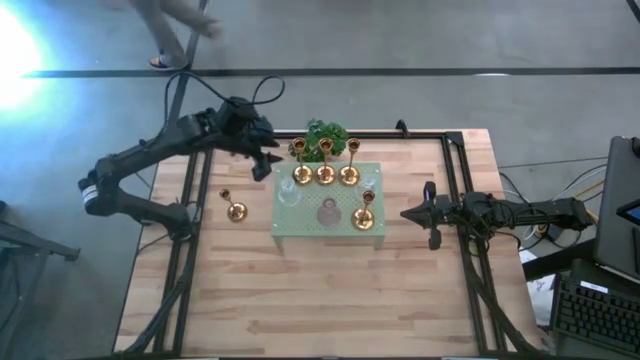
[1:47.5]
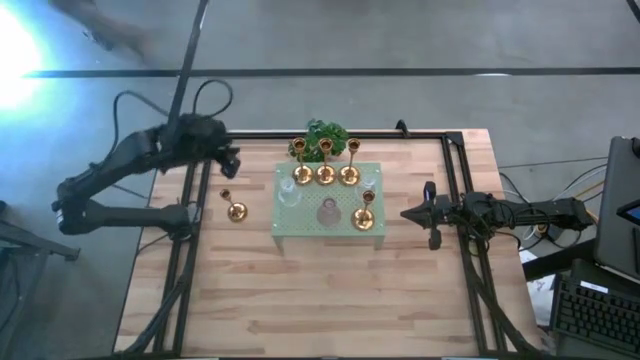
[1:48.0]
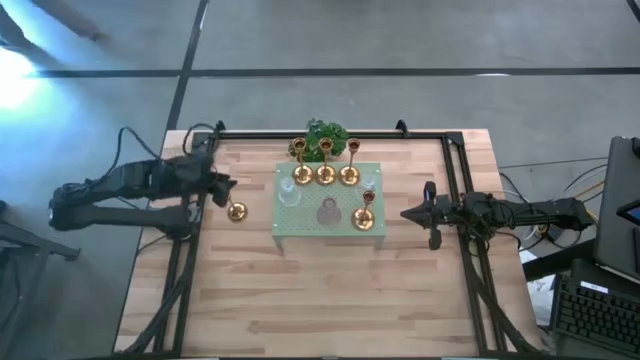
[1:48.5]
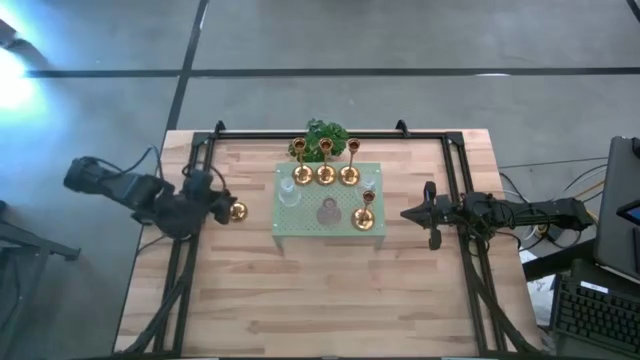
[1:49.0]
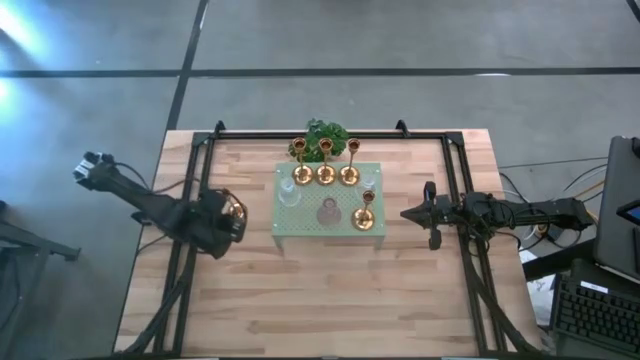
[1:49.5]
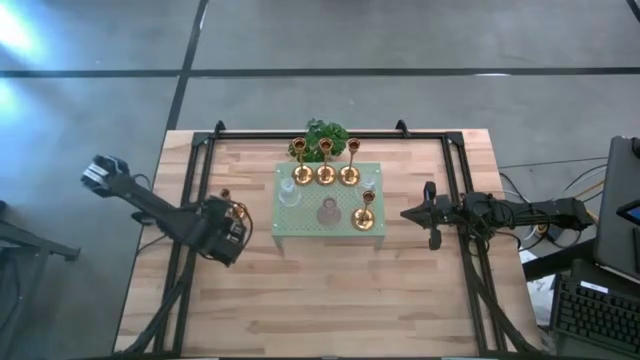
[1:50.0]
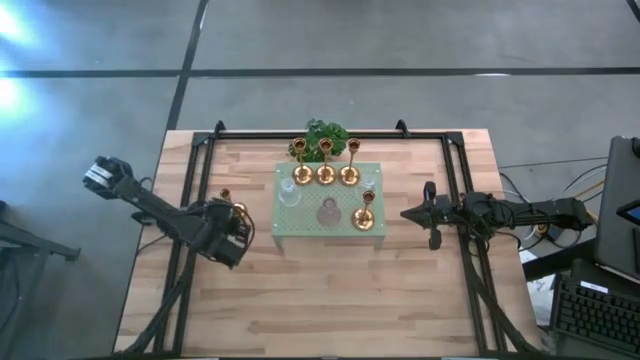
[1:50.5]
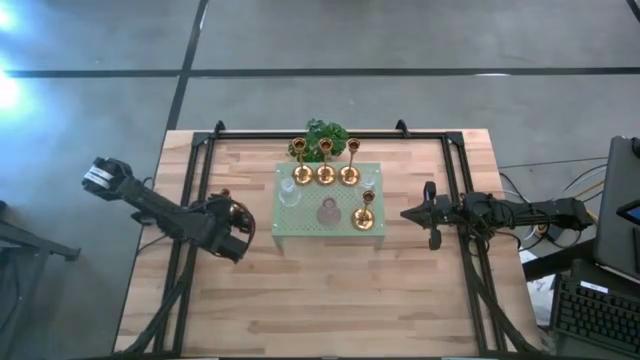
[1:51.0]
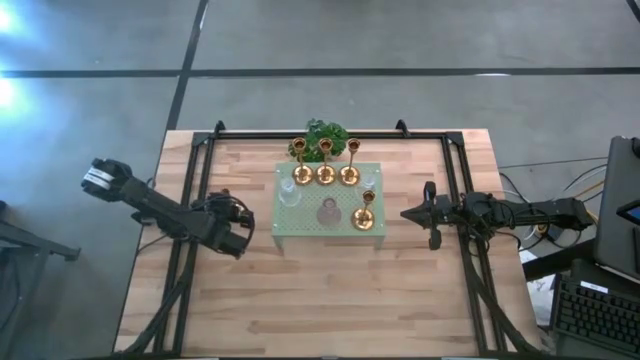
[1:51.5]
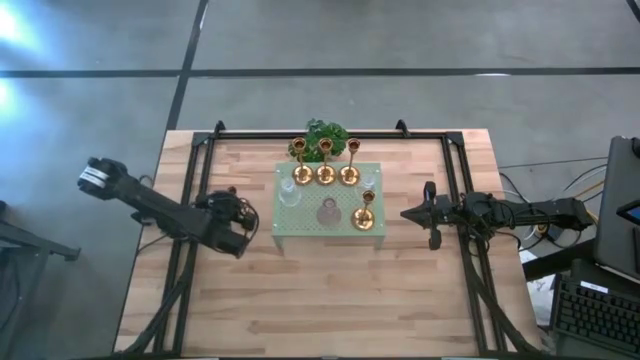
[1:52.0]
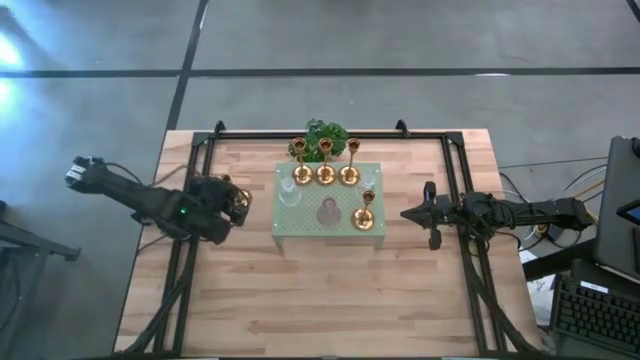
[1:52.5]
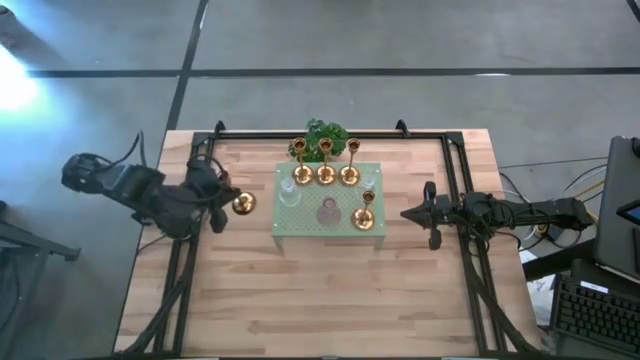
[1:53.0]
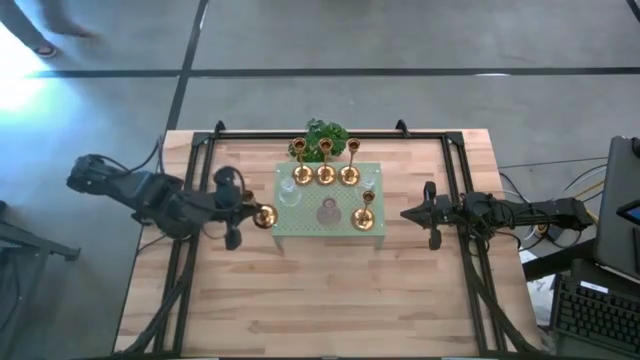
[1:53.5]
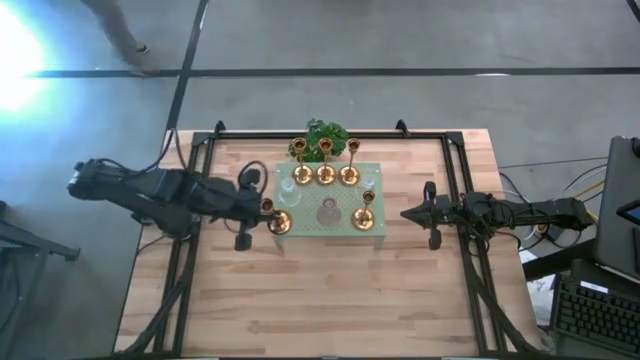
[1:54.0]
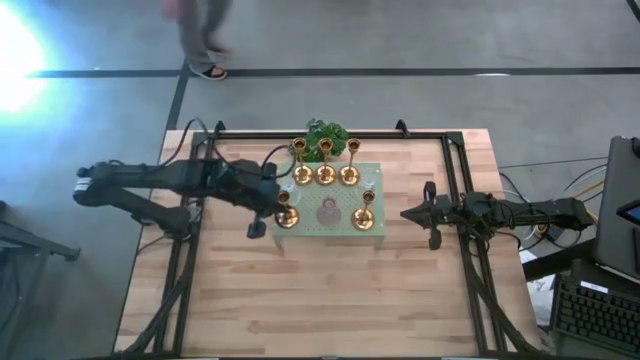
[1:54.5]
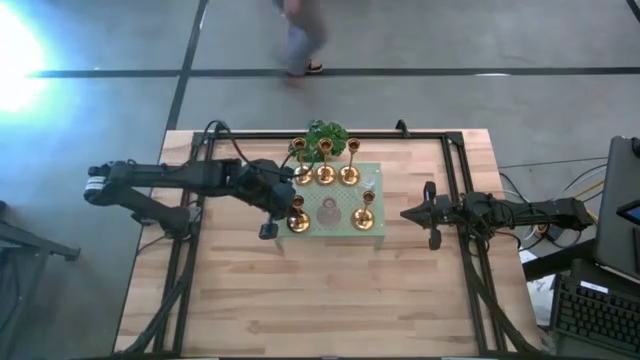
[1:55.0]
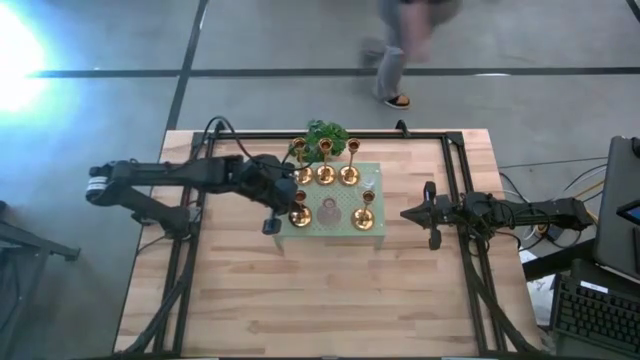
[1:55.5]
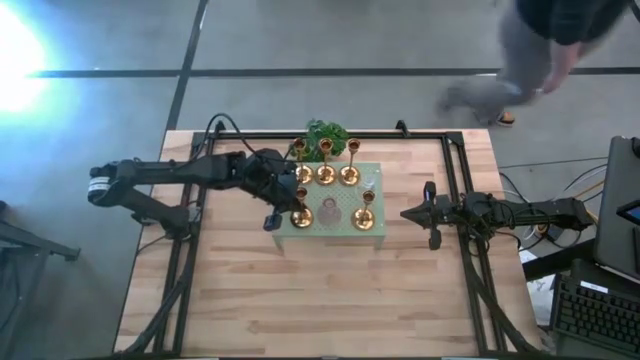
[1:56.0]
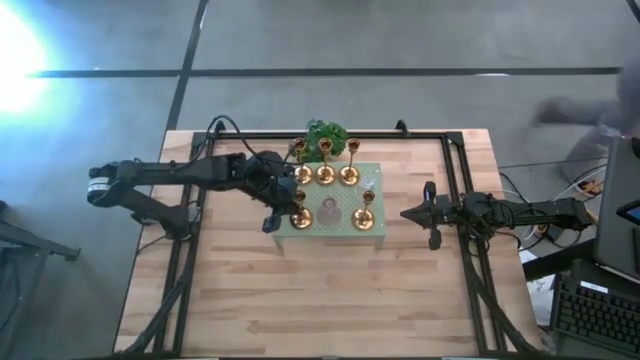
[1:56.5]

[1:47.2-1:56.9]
Task: Pick & Place candle stick holders
Put the gold candle holder on the shelf

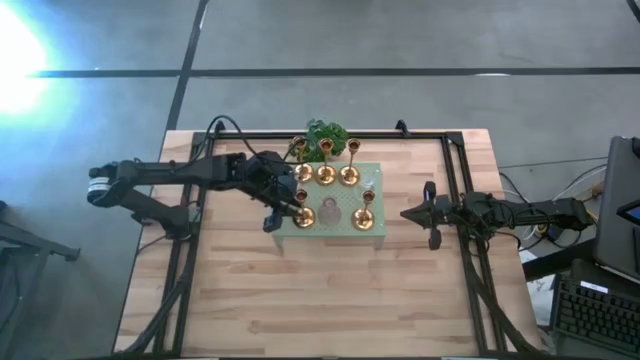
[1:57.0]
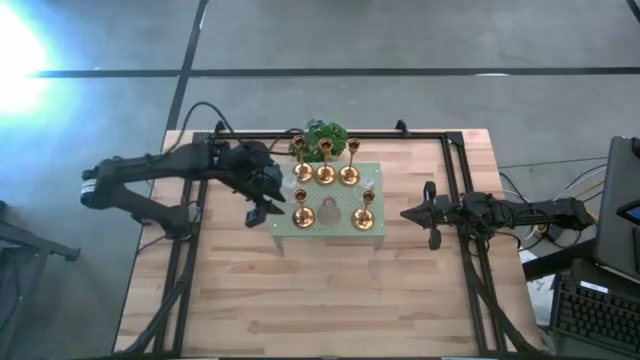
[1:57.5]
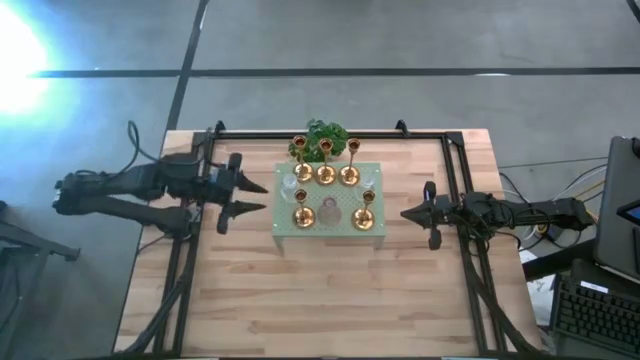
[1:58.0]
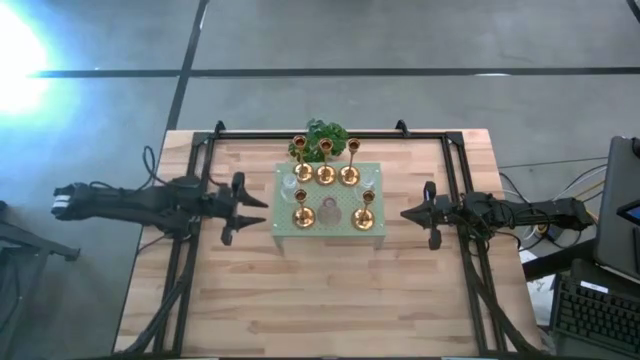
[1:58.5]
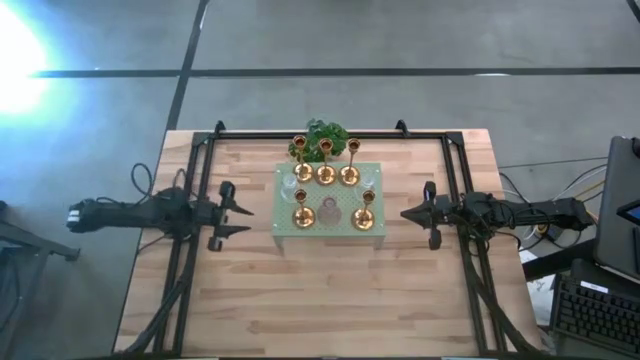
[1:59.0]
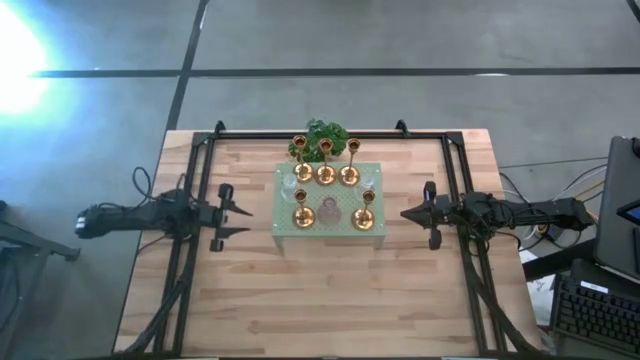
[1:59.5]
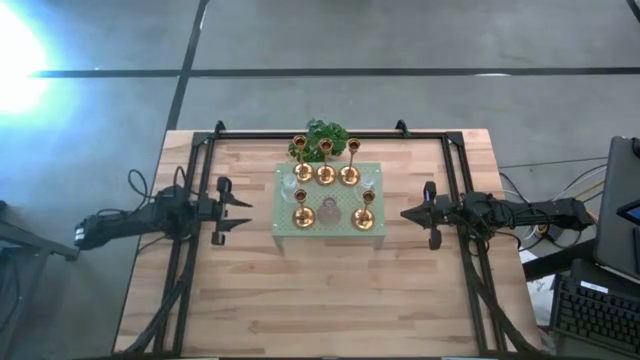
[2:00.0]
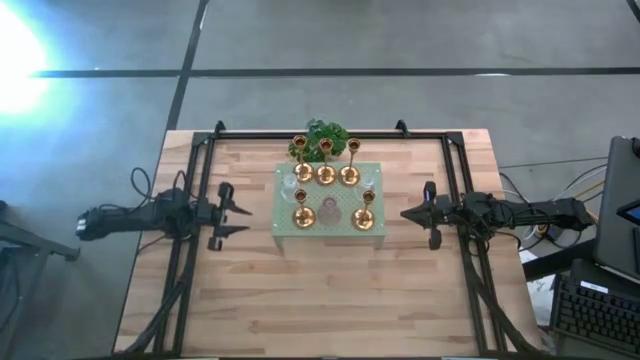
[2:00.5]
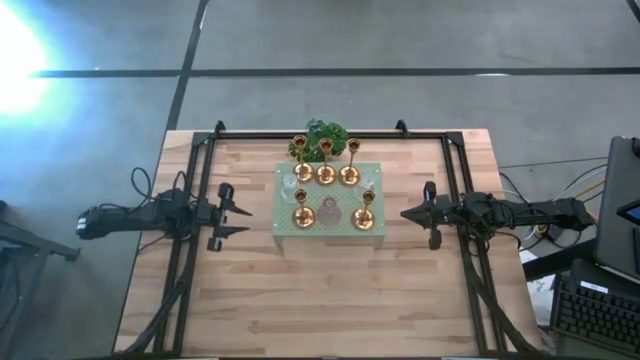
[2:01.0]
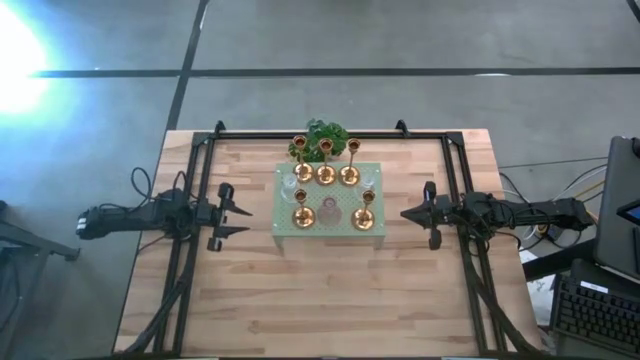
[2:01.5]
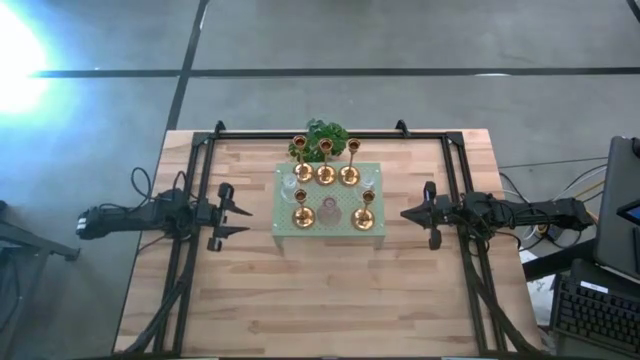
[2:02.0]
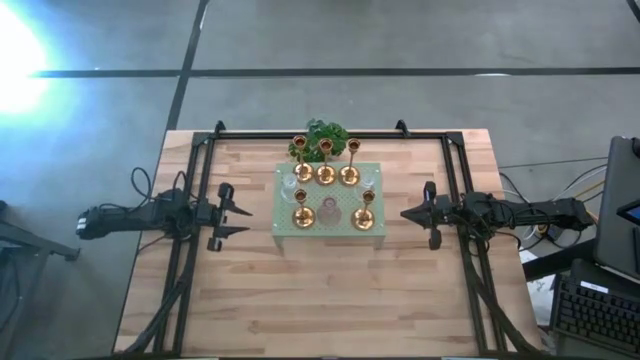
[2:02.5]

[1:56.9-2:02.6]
Return to Home Position

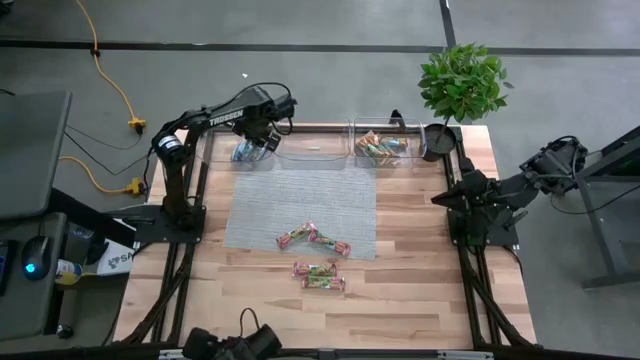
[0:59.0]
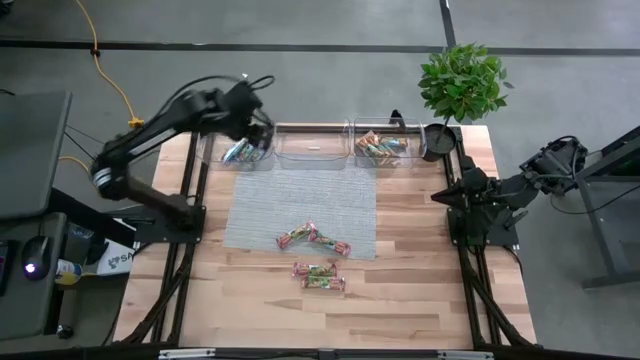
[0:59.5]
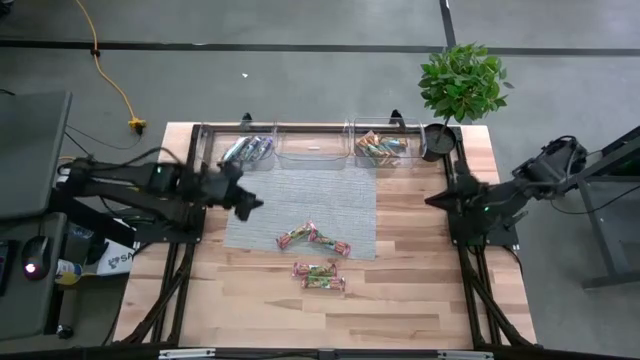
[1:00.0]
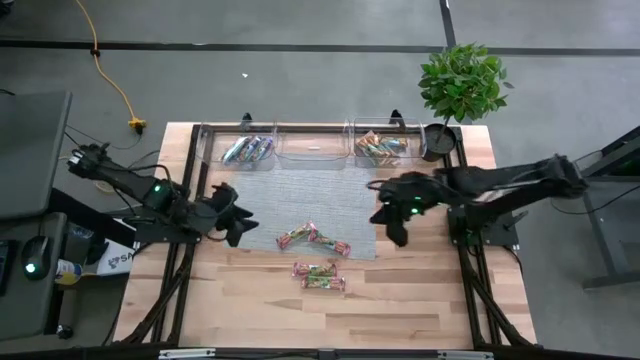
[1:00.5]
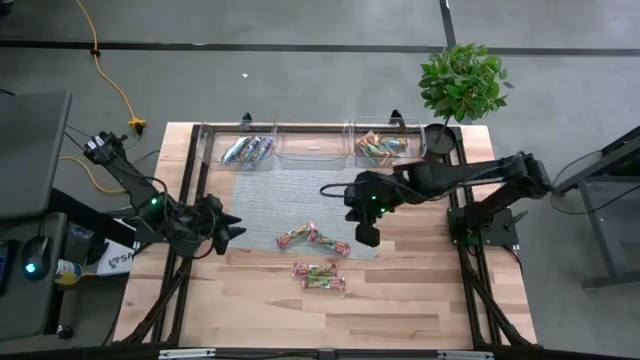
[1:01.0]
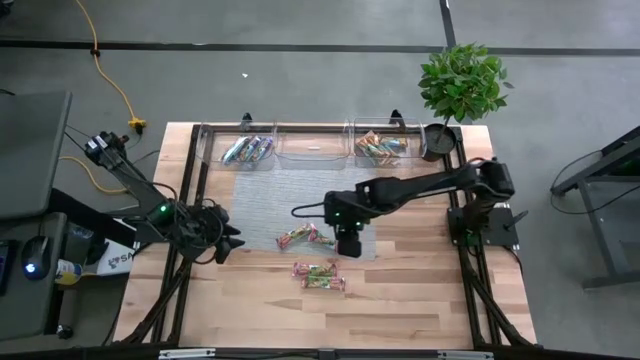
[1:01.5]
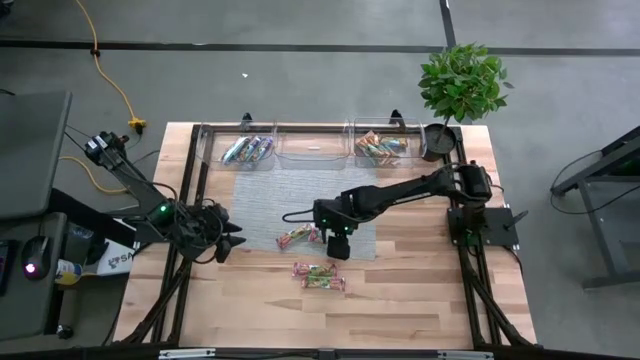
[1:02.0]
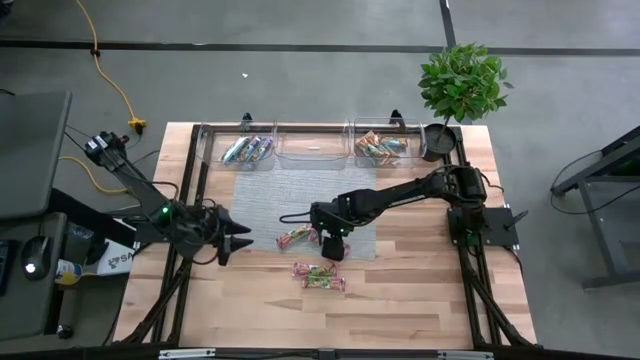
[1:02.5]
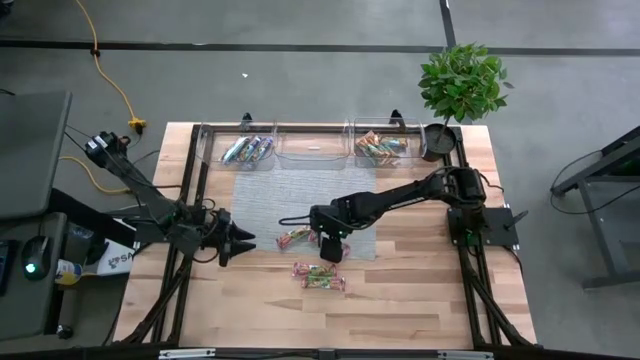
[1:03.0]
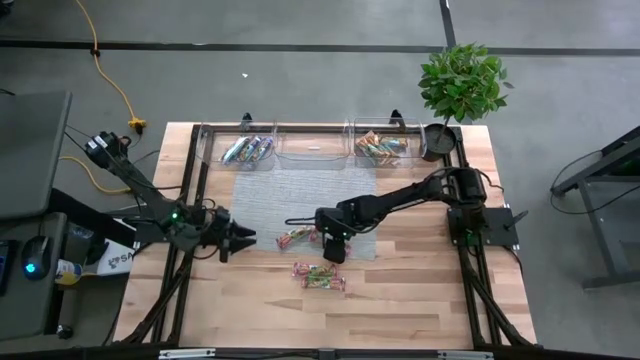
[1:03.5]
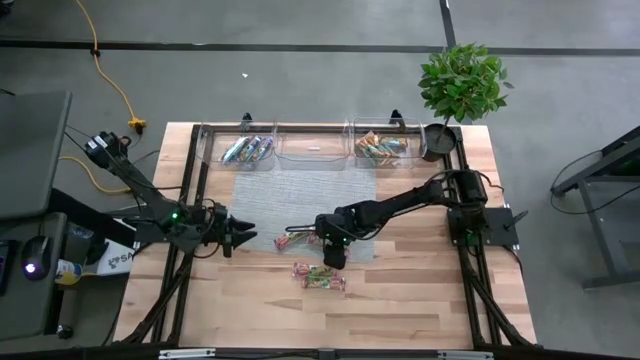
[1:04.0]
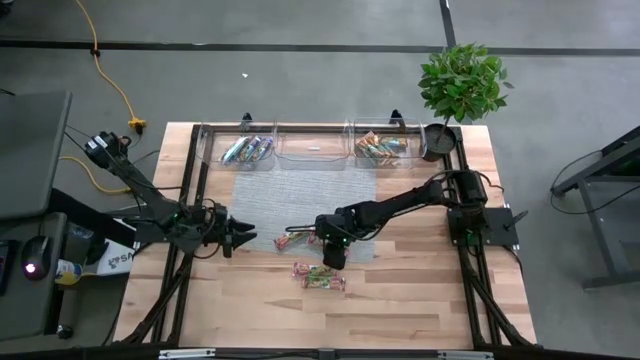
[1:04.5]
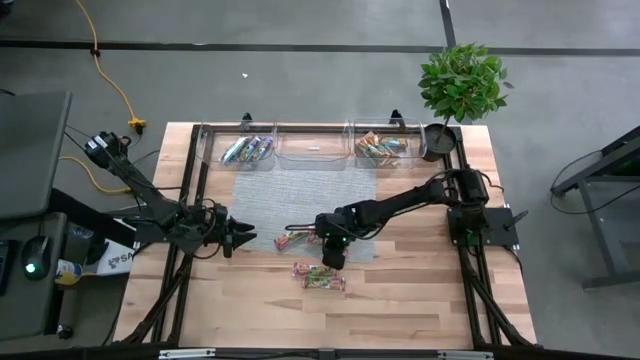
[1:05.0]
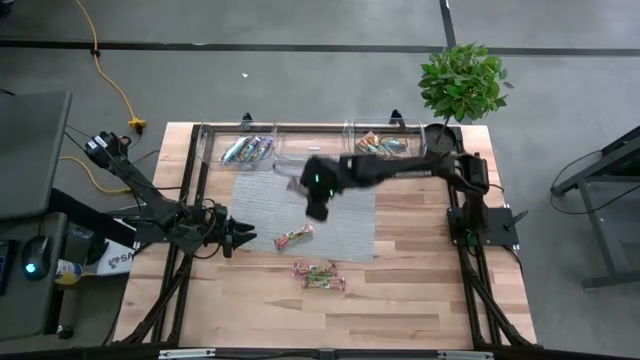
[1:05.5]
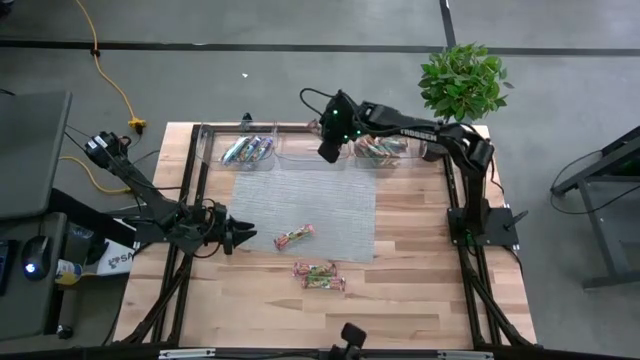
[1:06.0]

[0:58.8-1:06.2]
Task: Pick and place Granola Bars by type
Put the red granola bar into the middle transparent bin
